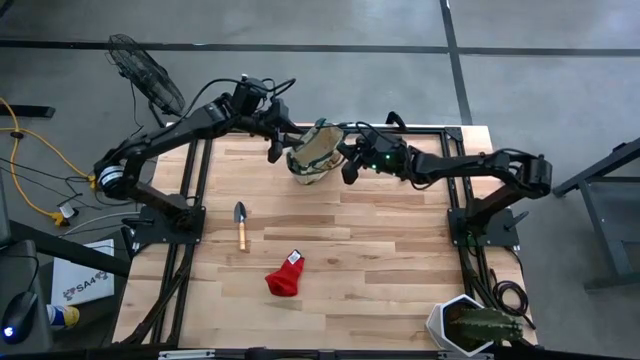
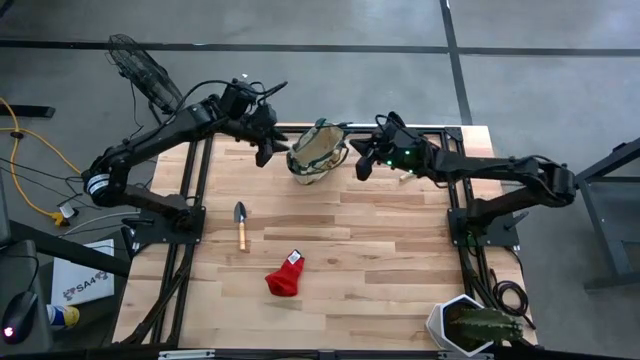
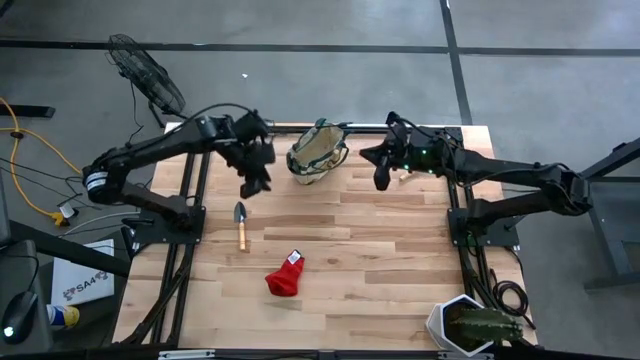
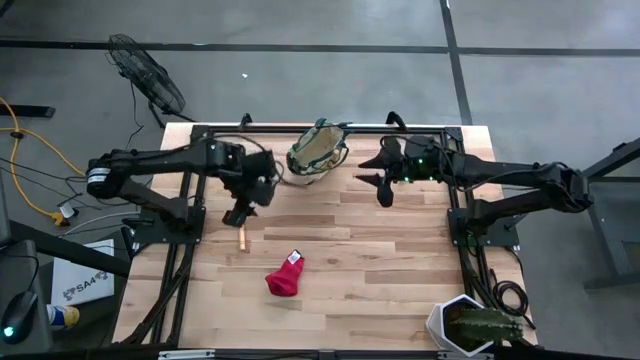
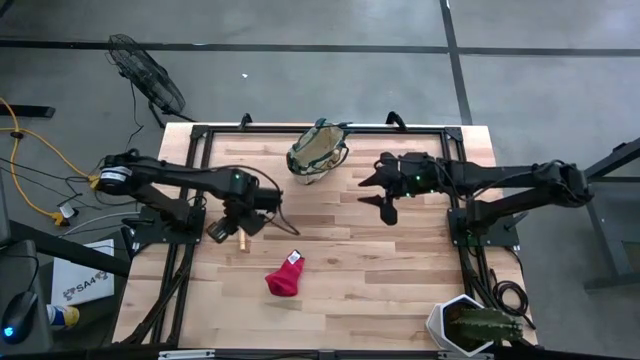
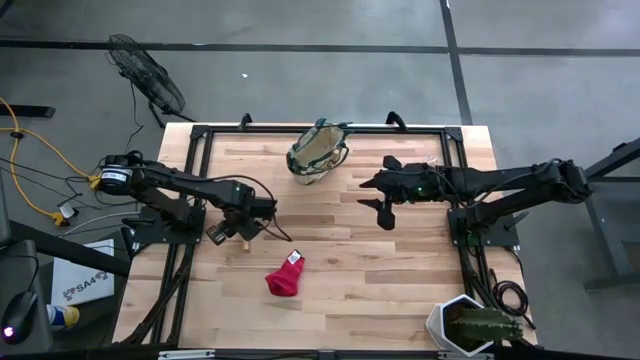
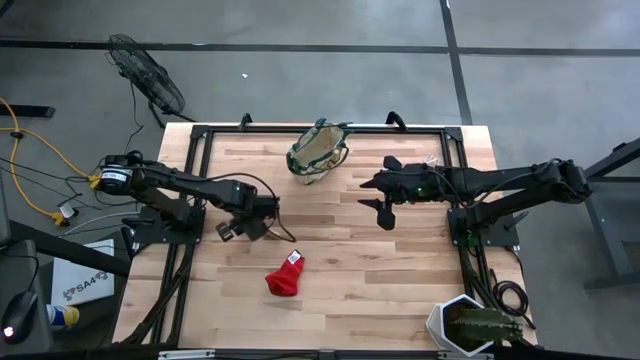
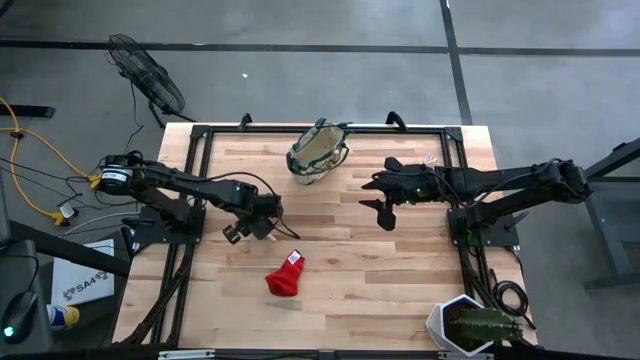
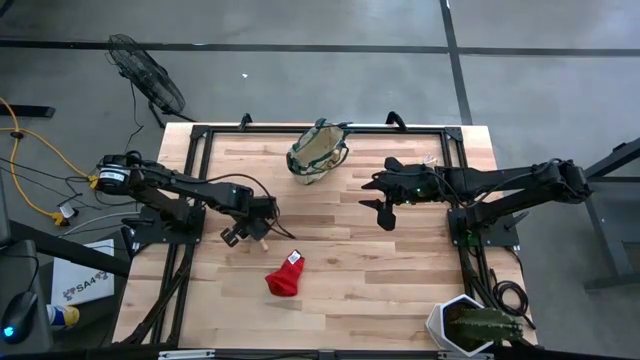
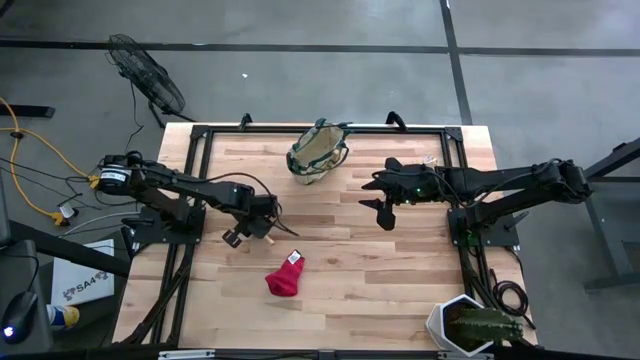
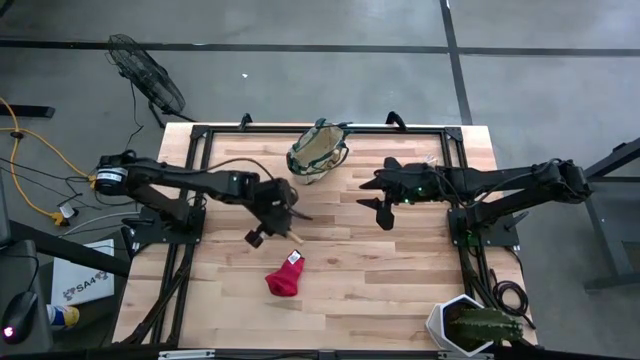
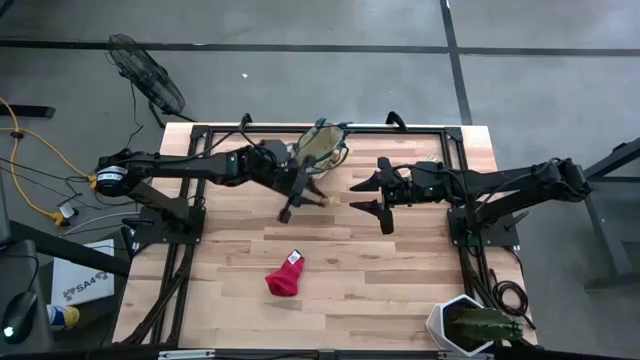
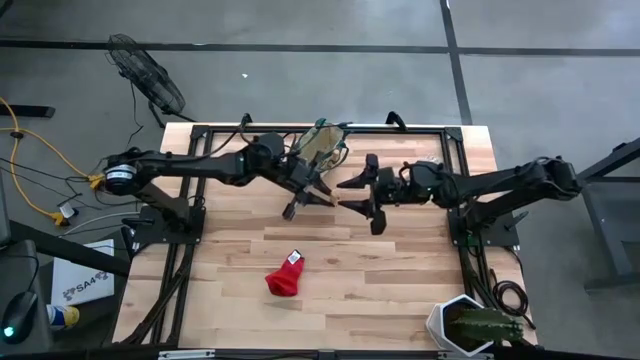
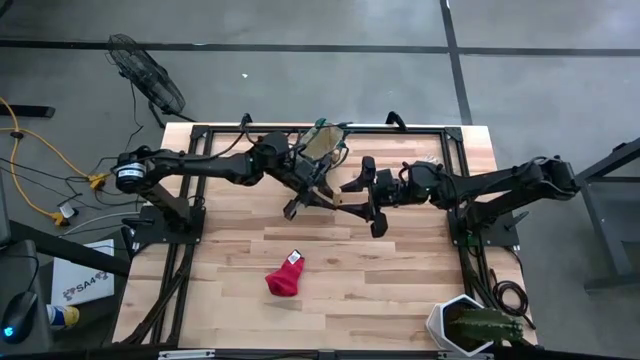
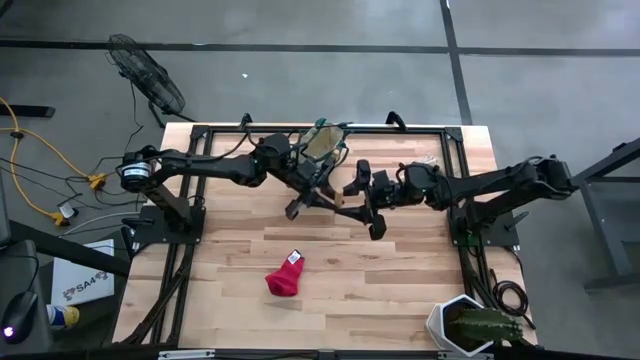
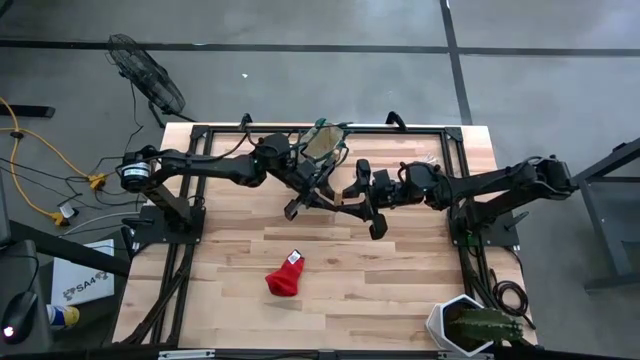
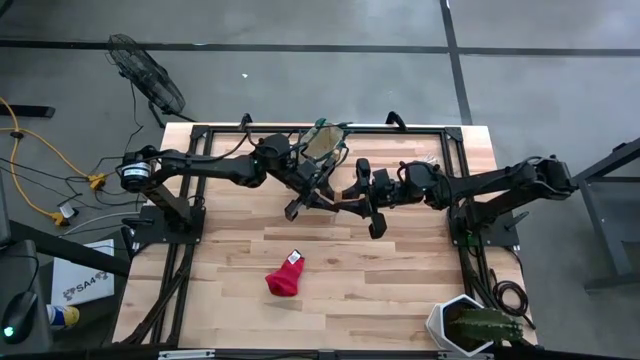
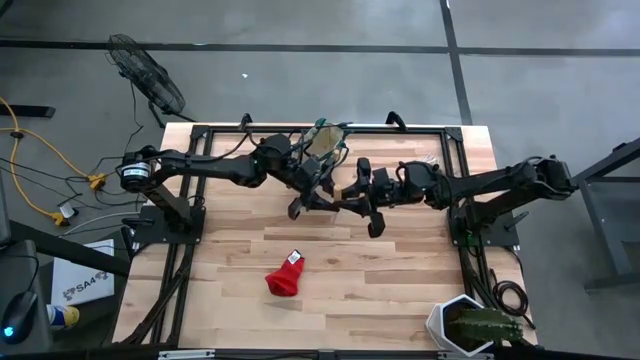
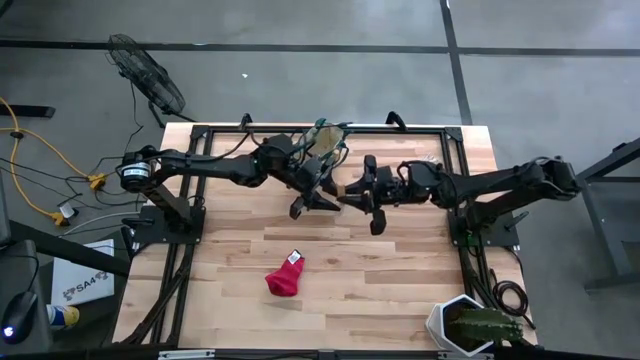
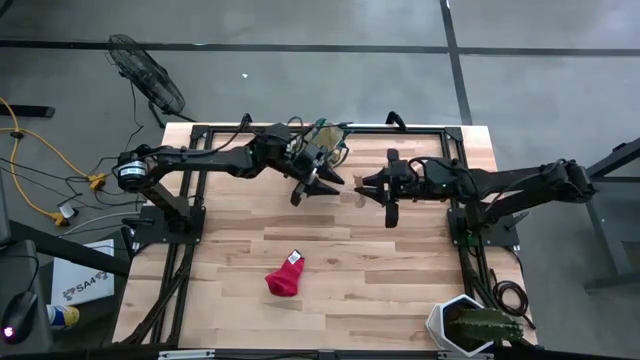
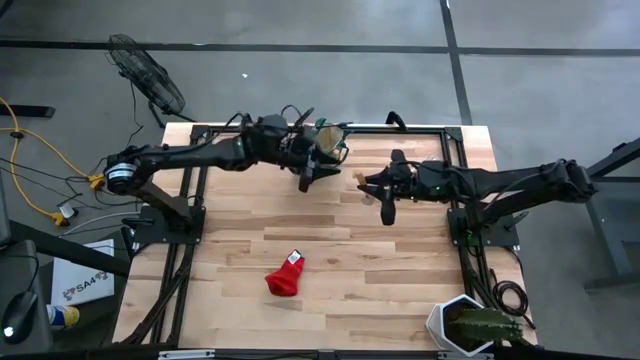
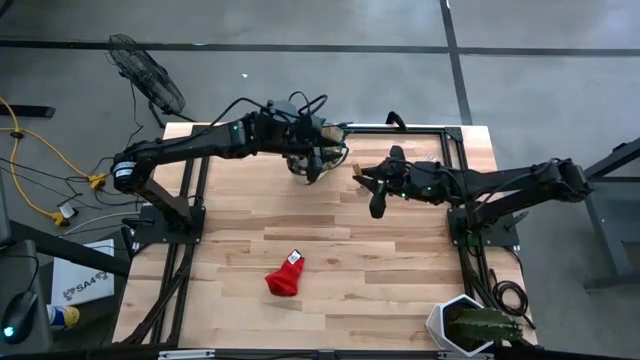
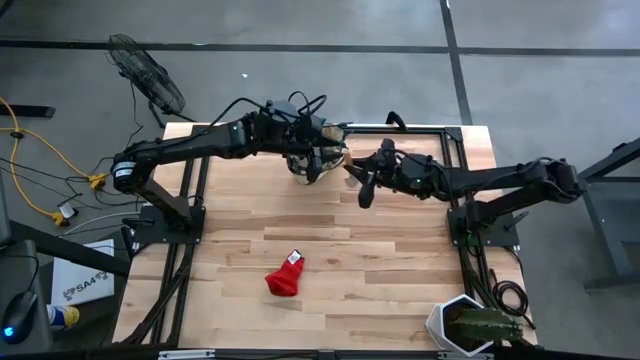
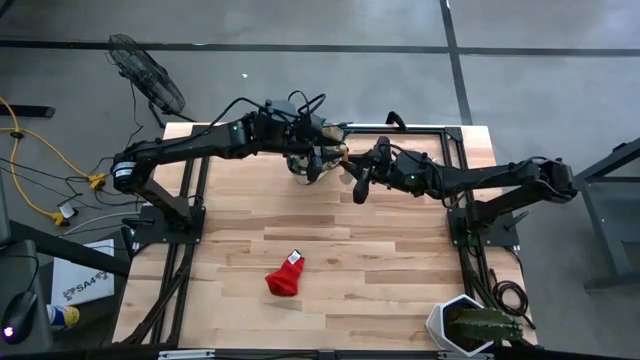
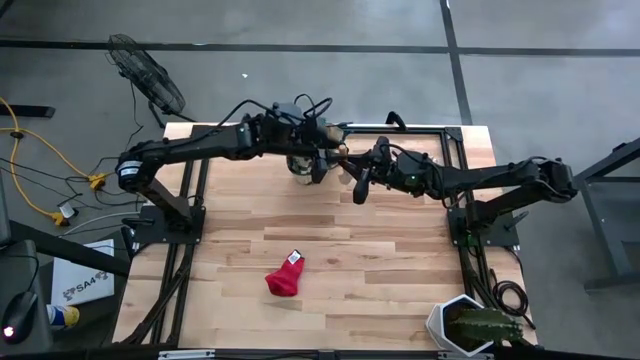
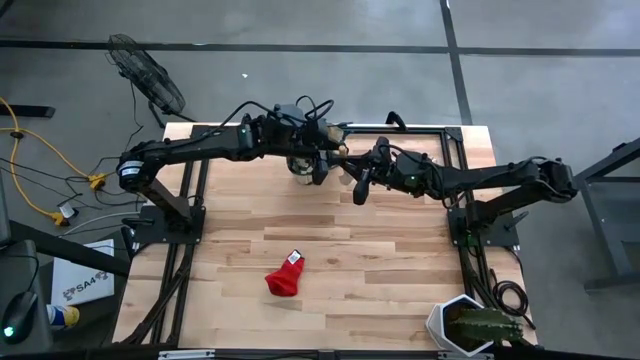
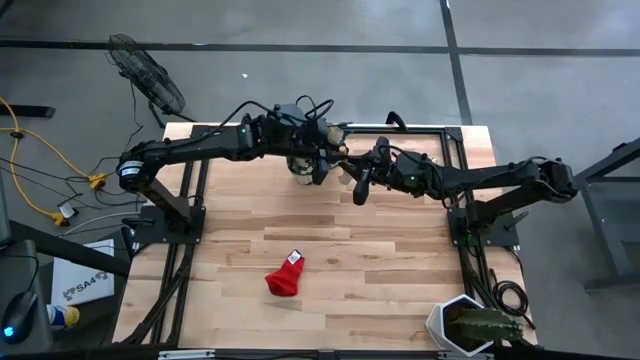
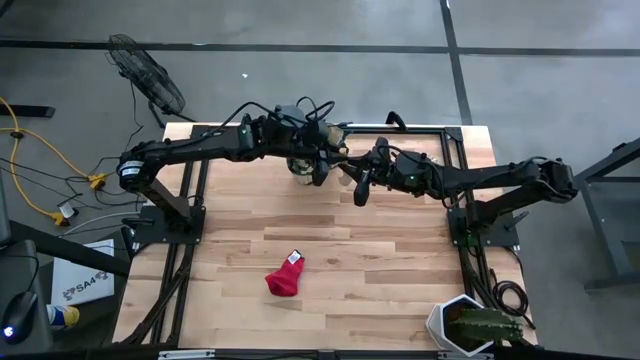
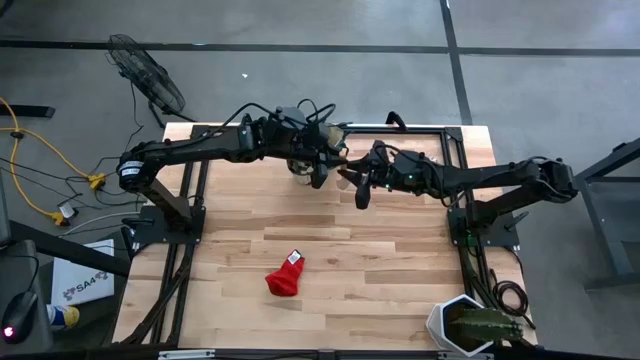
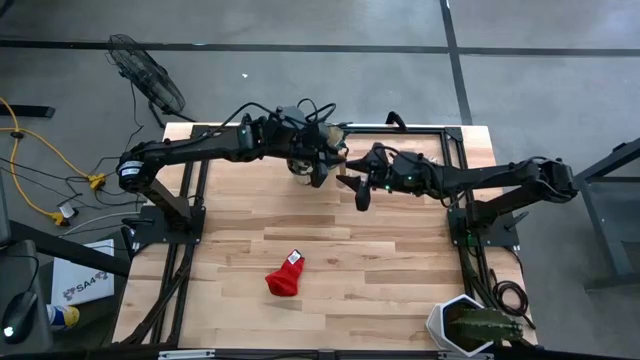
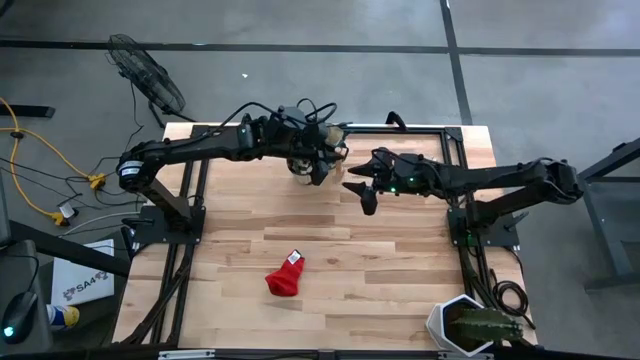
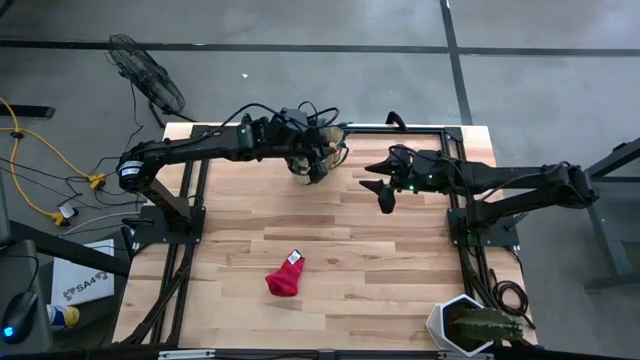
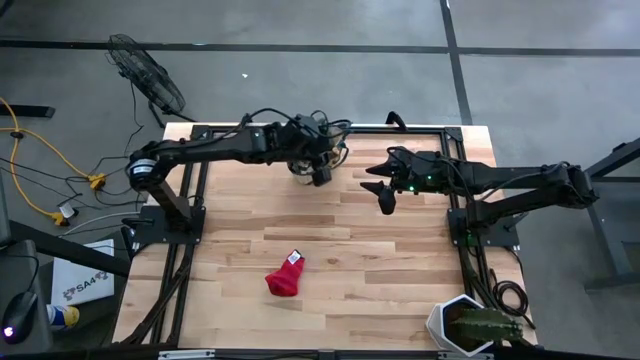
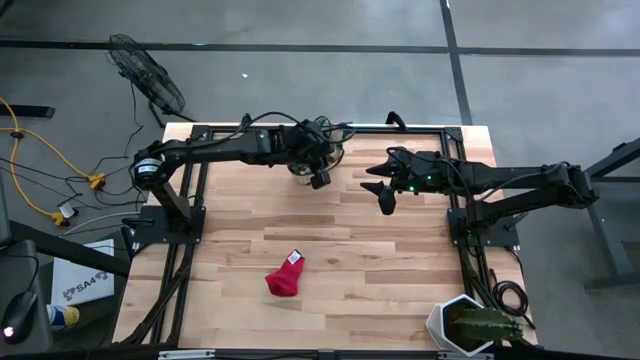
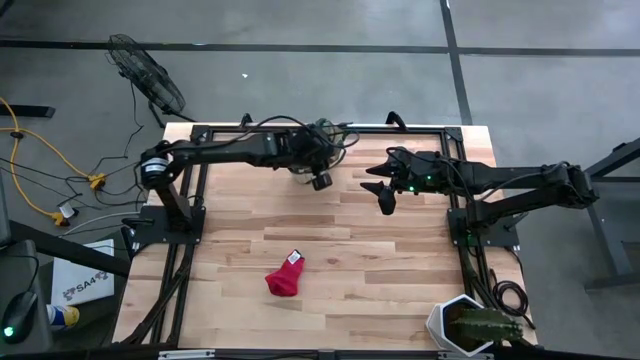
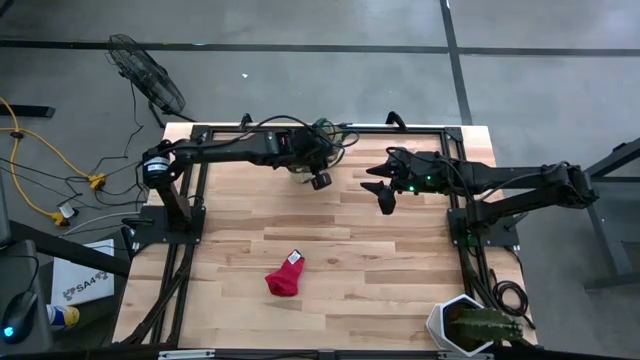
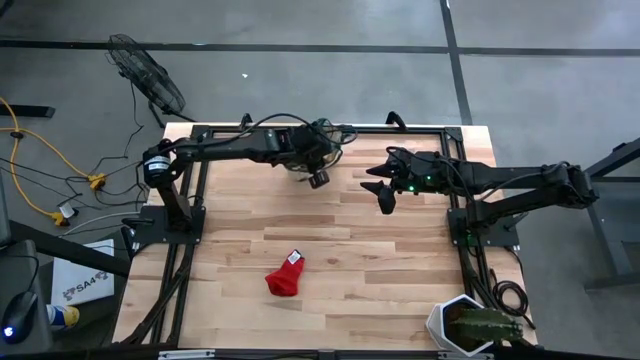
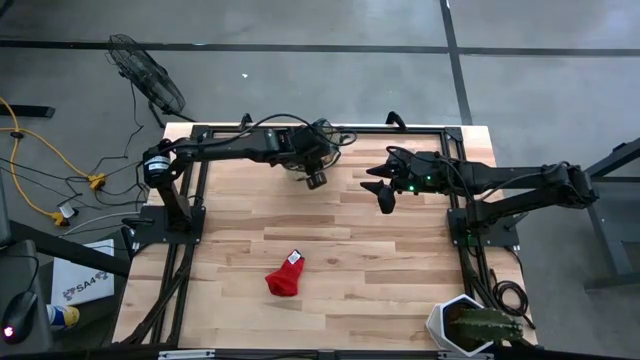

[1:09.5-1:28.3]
Task: Pick & Place Garden tools in Gardening bag
Put the brown trowel into the white gardening bag

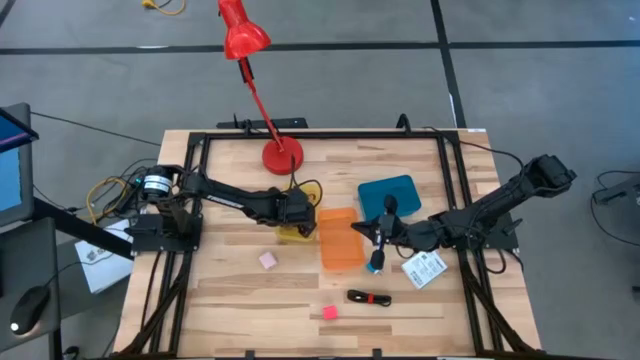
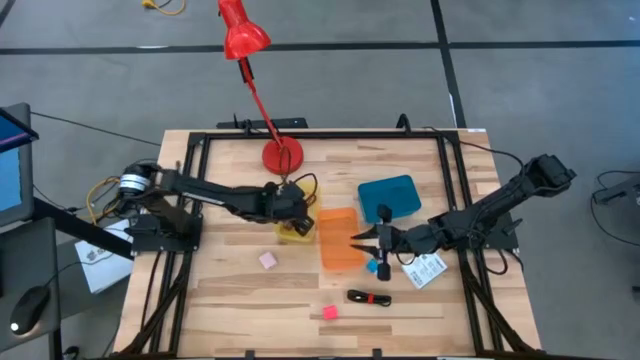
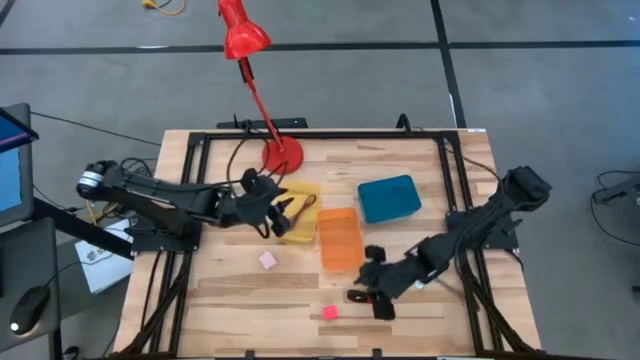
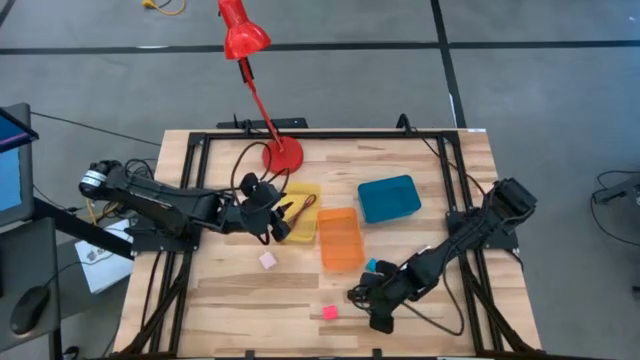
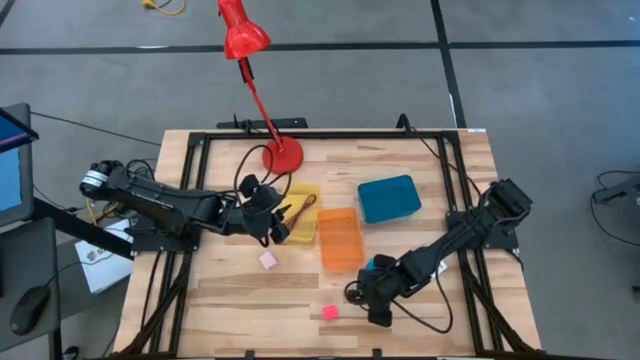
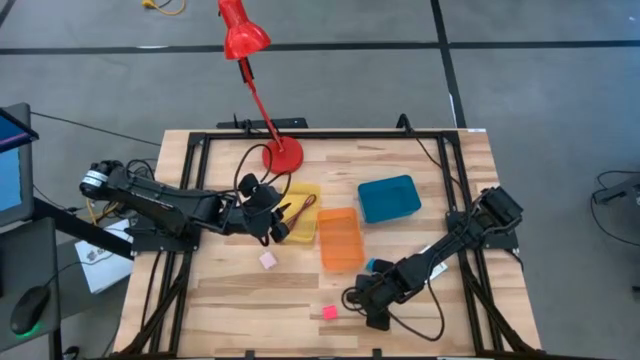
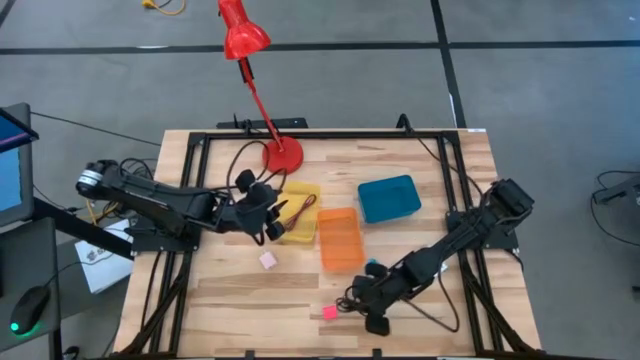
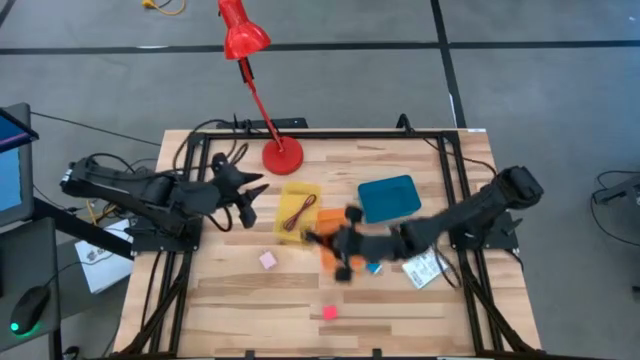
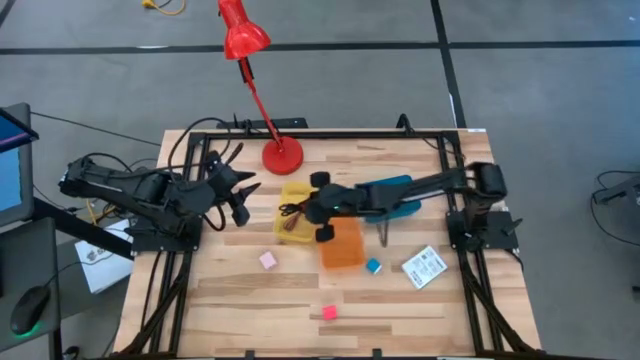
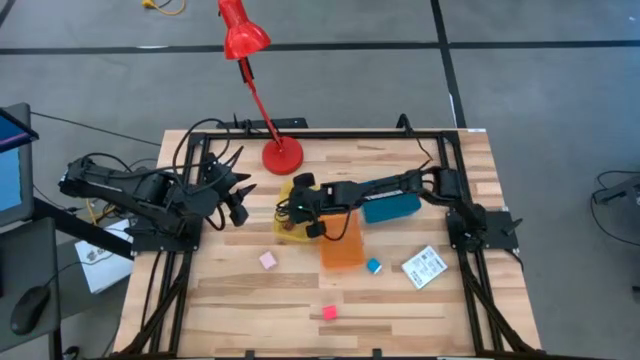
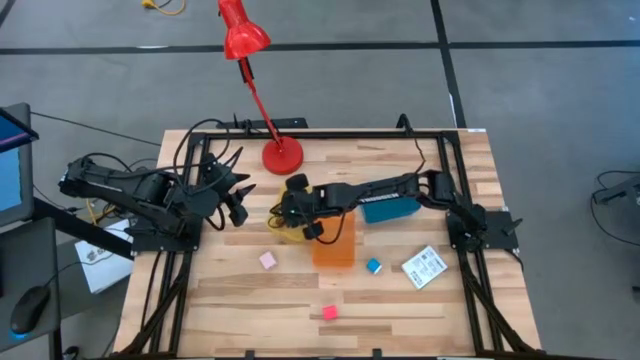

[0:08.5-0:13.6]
Task: Pick and place items into bin
Put the black charger cable into the yellow bin
